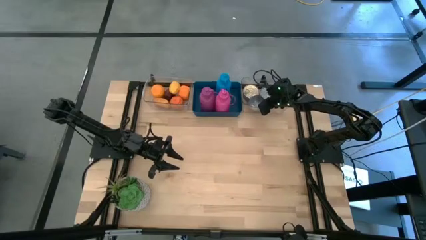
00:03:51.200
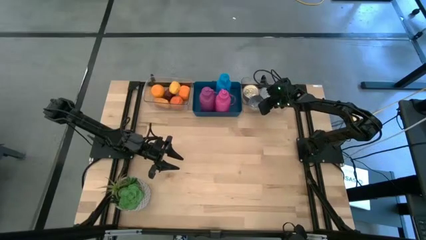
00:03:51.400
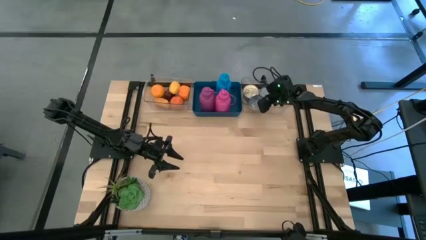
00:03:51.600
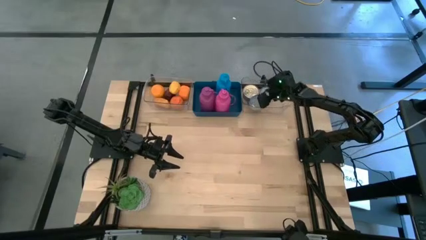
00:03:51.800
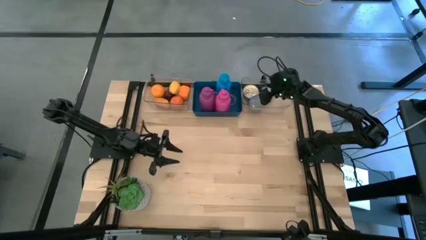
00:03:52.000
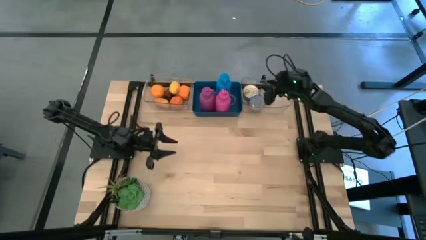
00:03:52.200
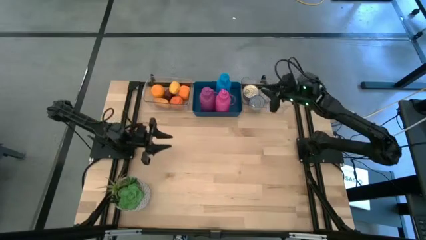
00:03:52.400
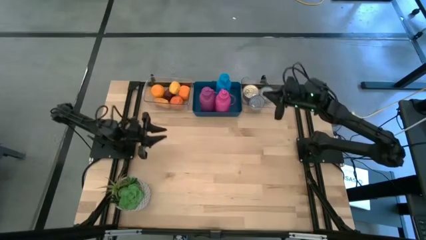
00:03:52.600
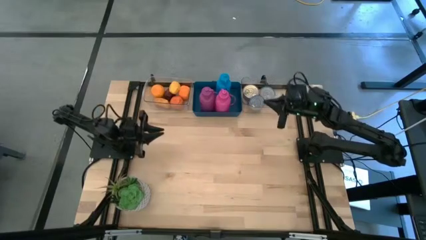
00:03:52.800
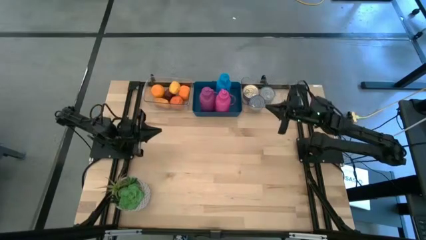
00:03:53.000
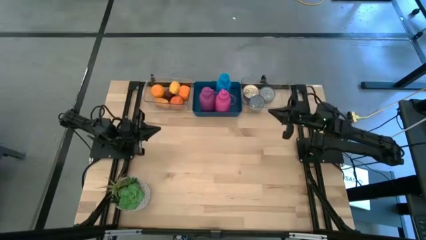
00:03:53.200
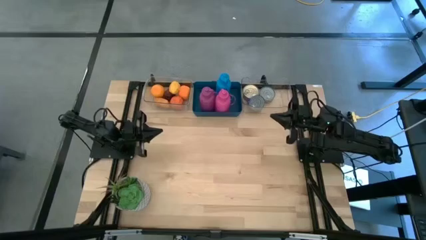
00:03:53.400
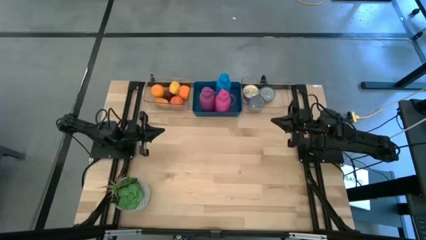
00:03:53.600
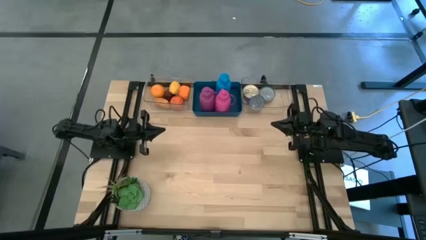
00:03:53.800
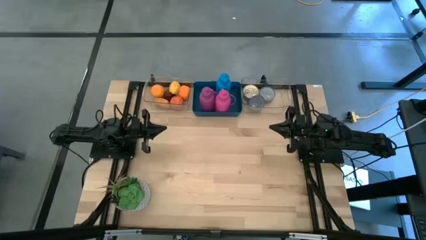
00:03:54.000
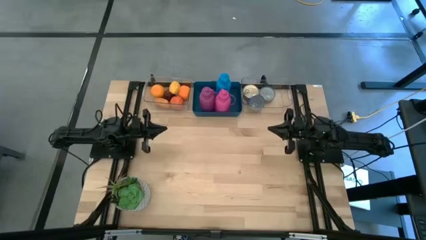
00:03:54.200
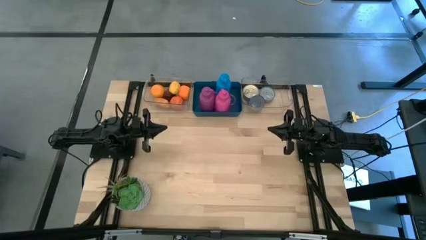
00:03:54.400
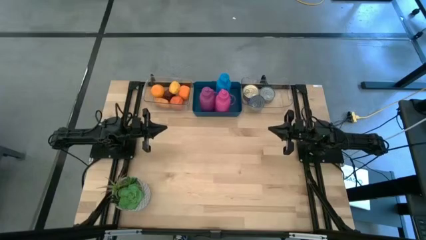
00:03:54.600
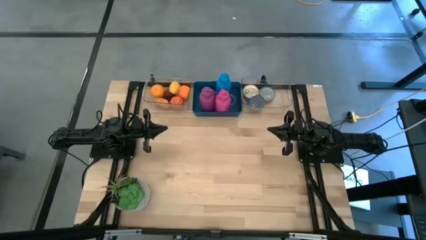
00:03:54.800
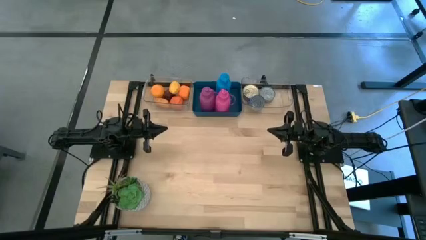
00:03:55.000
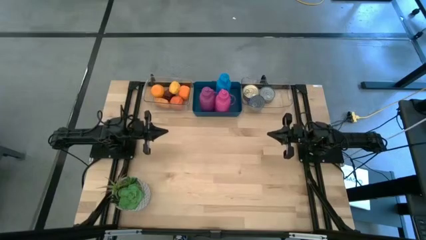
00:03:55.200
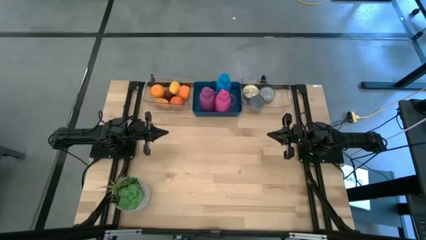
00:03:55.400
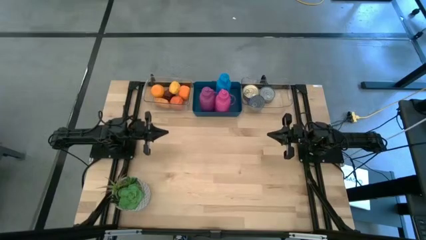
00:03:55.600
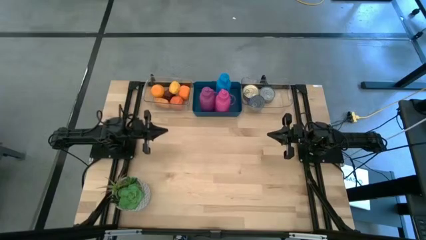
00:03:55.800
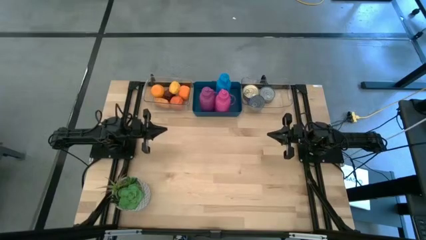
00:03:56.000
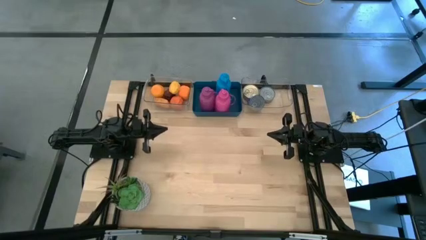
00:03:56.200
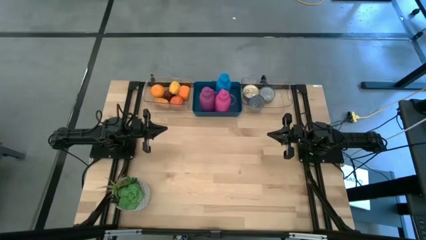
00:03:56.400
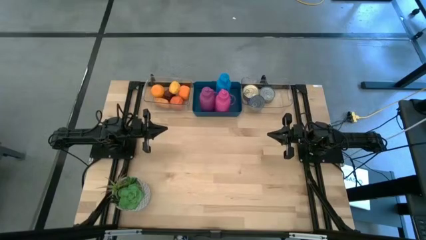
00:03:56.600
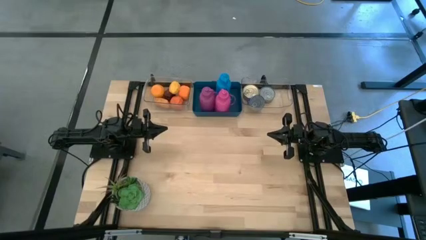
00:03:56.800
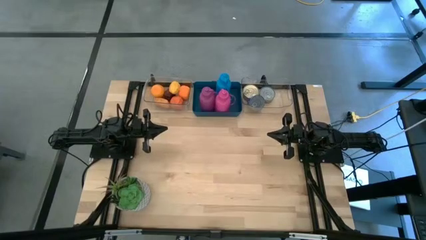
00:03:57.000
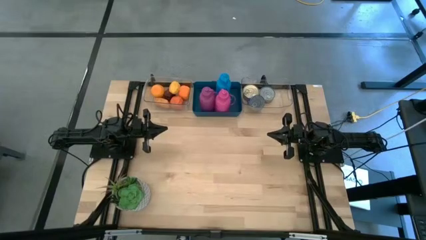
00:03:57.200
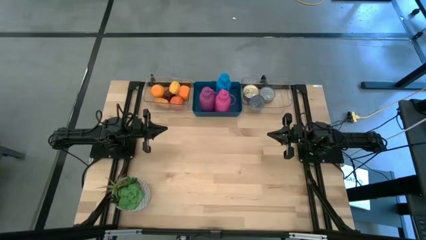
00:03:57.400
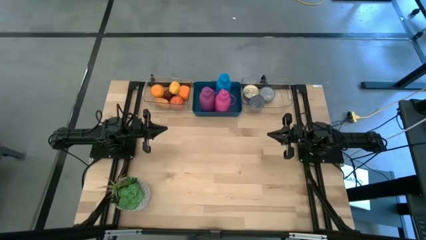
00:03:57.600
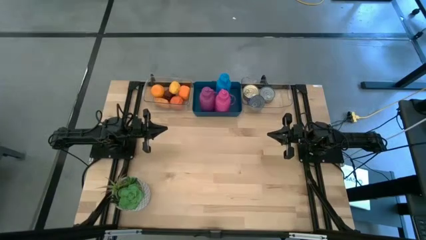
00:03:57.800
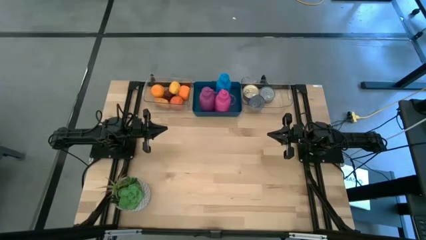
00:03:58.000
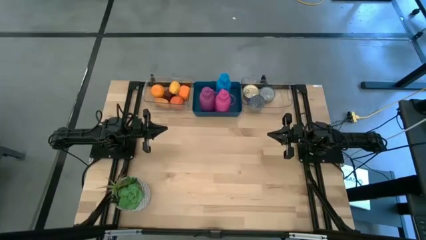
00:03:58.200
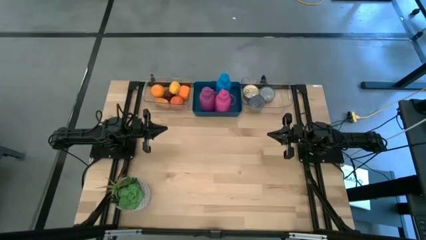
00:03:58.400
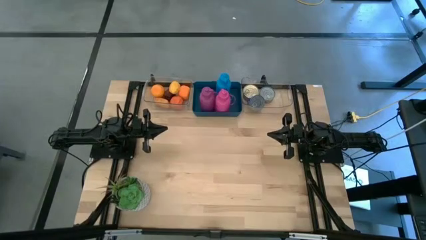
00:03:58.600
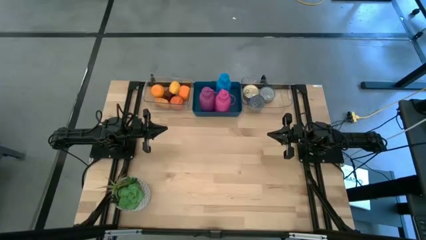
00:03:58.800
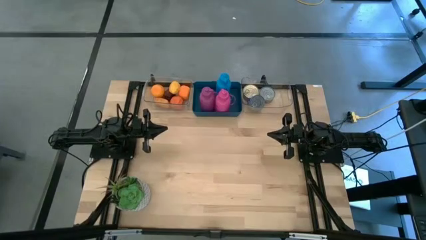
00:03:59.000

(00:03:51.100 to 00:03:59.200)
Task: Pick & Place Food Item
Return to Home Position

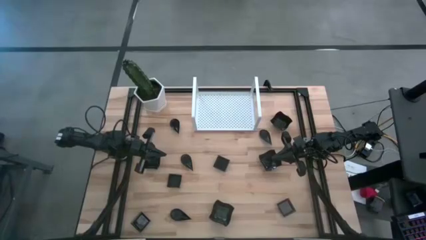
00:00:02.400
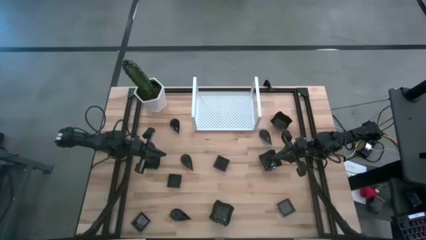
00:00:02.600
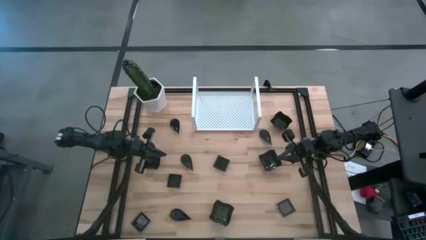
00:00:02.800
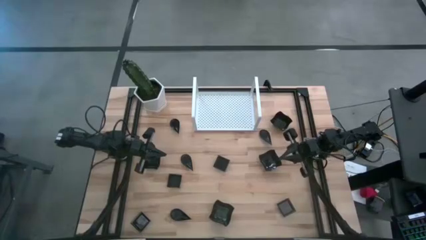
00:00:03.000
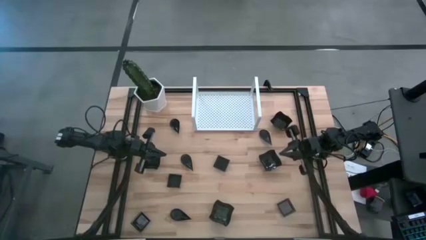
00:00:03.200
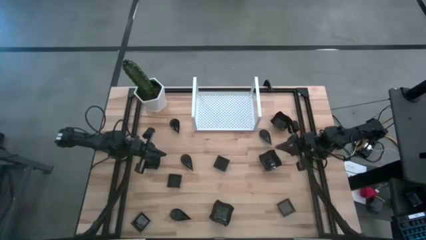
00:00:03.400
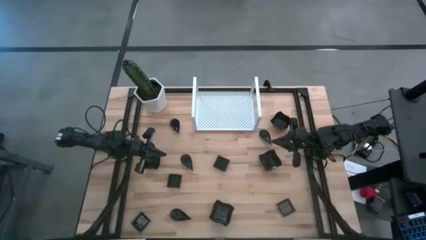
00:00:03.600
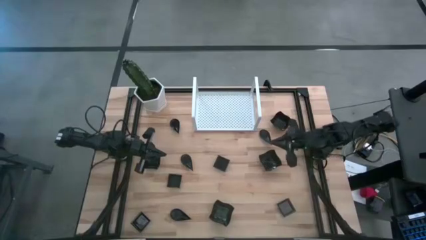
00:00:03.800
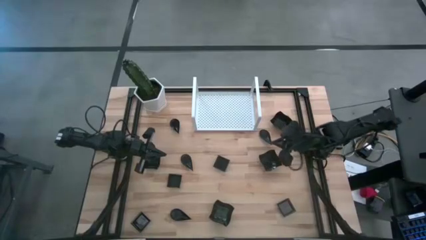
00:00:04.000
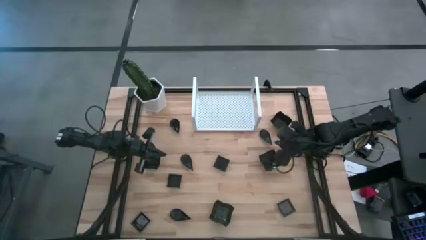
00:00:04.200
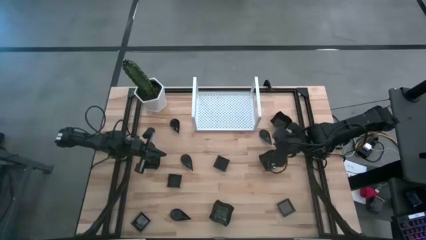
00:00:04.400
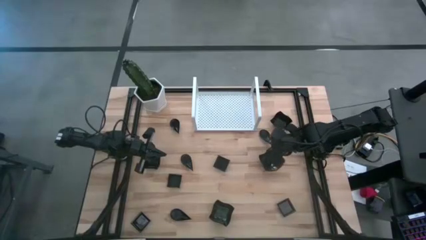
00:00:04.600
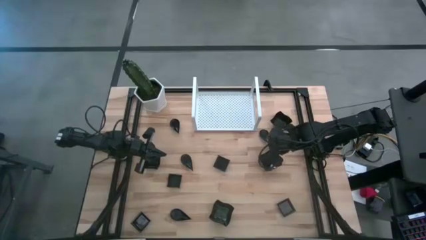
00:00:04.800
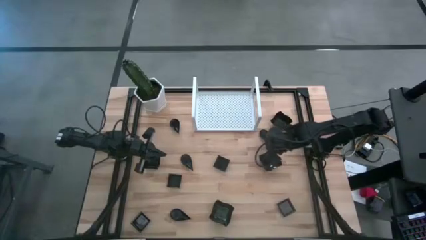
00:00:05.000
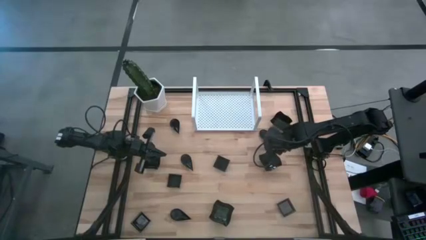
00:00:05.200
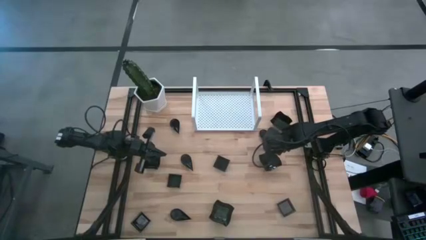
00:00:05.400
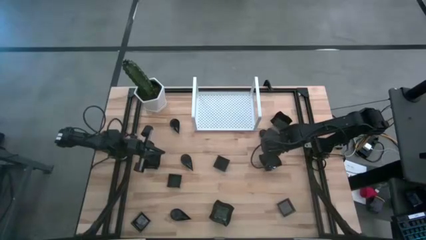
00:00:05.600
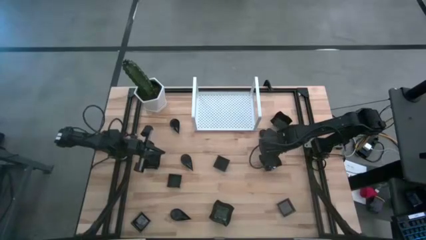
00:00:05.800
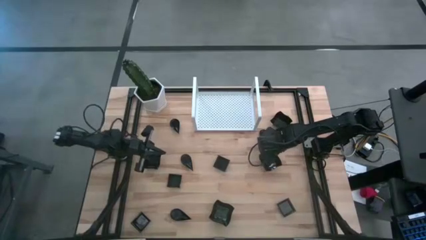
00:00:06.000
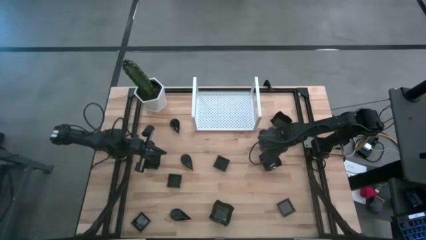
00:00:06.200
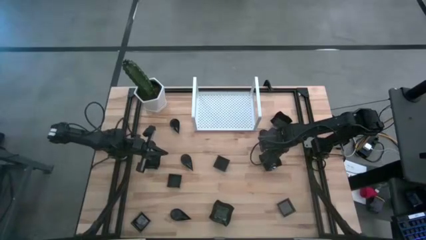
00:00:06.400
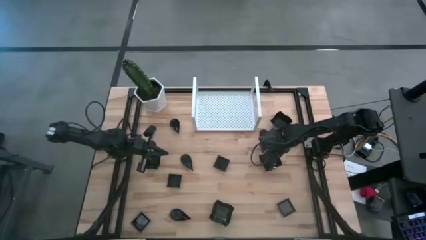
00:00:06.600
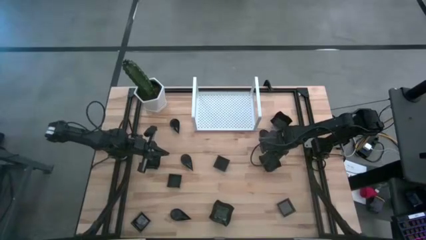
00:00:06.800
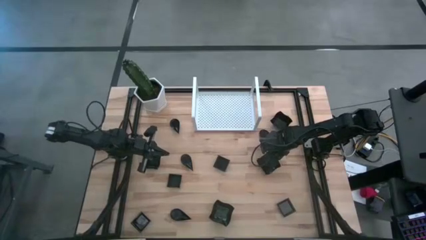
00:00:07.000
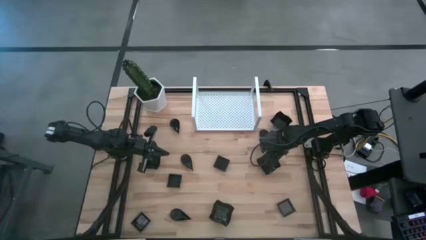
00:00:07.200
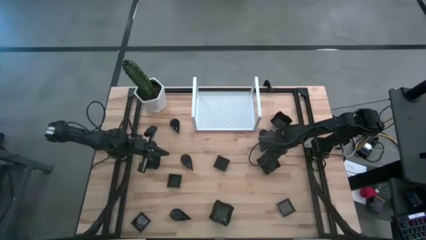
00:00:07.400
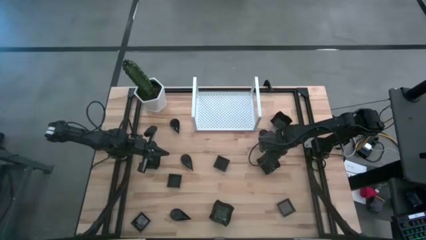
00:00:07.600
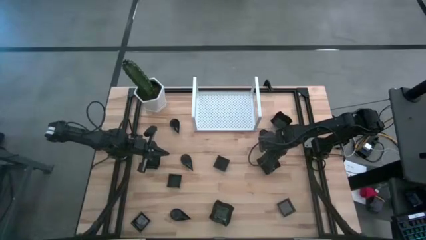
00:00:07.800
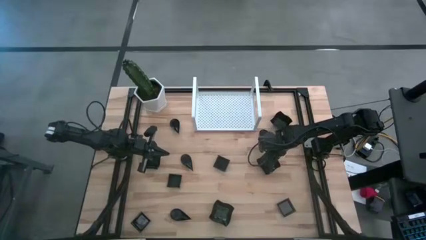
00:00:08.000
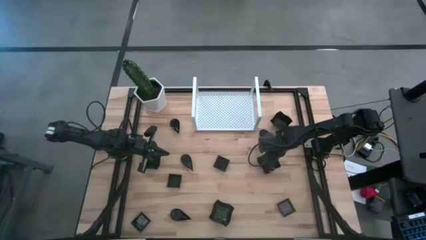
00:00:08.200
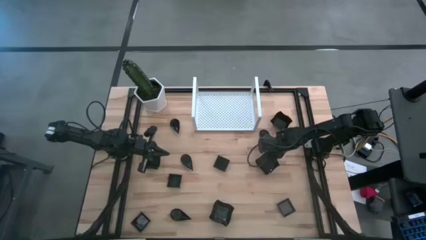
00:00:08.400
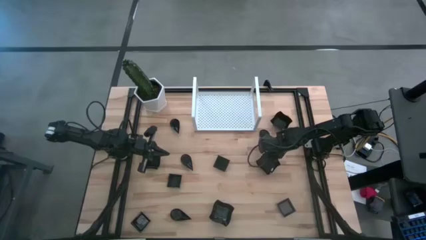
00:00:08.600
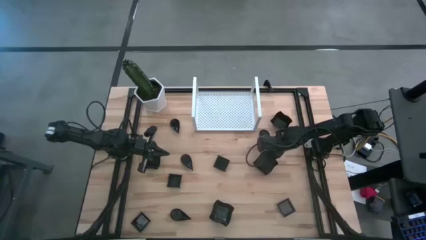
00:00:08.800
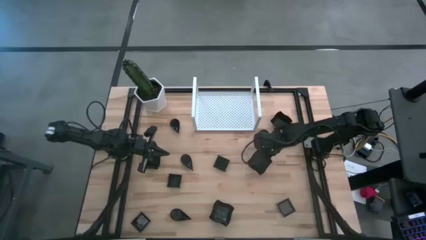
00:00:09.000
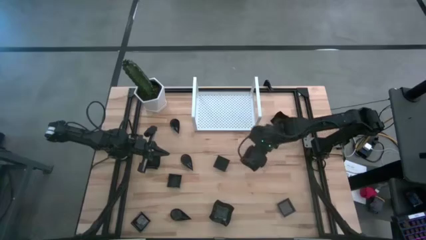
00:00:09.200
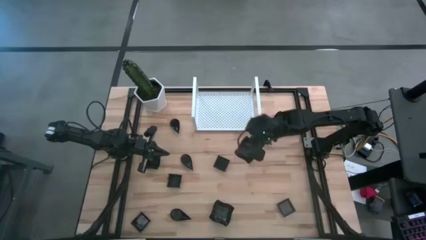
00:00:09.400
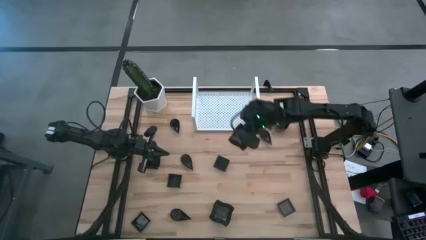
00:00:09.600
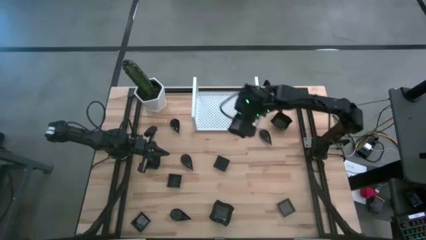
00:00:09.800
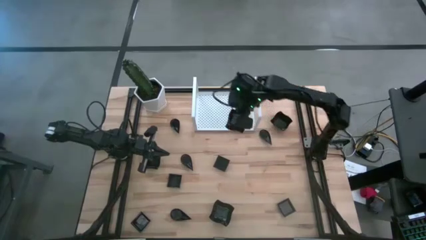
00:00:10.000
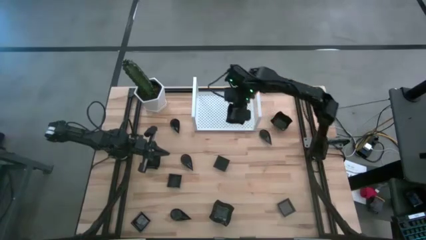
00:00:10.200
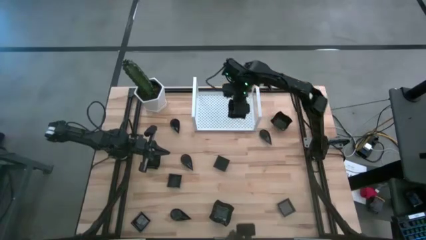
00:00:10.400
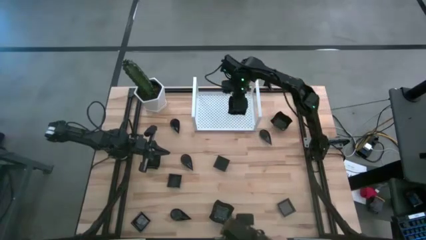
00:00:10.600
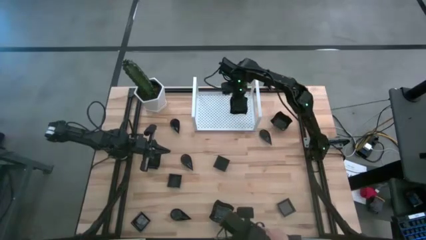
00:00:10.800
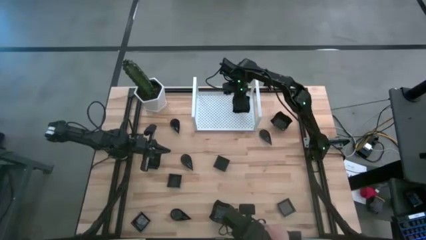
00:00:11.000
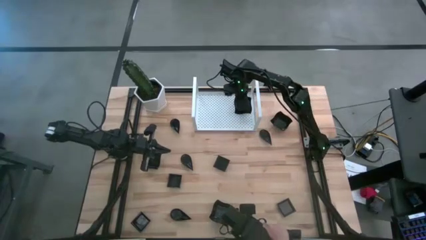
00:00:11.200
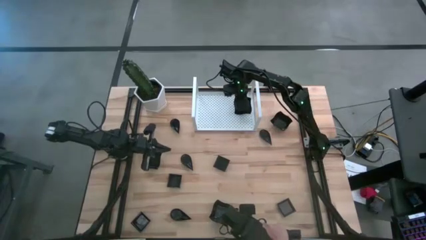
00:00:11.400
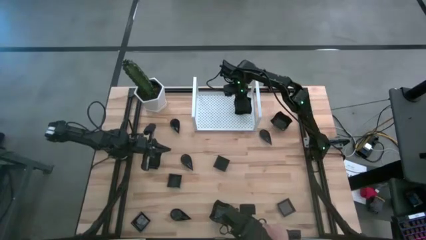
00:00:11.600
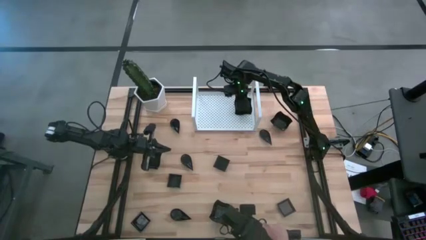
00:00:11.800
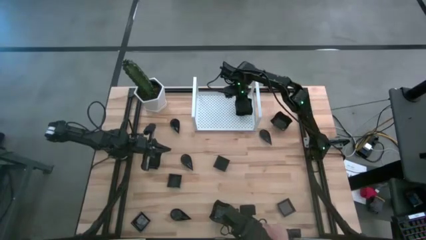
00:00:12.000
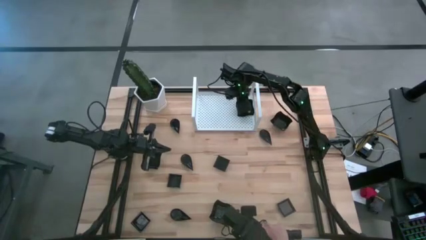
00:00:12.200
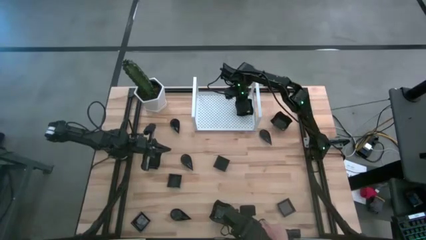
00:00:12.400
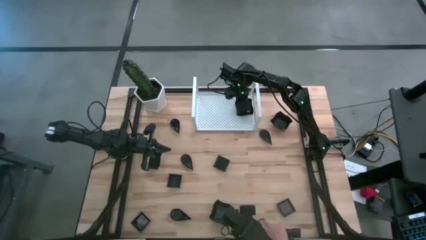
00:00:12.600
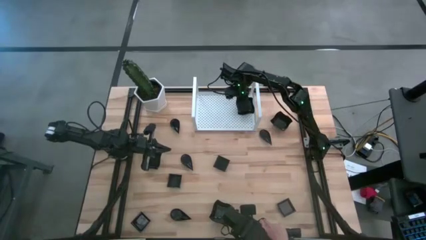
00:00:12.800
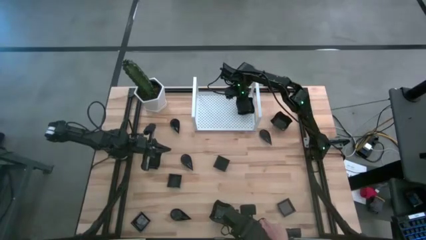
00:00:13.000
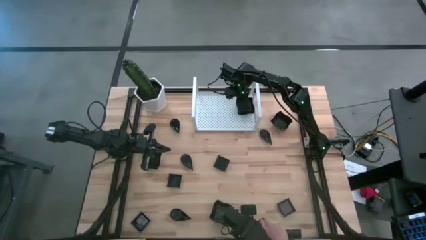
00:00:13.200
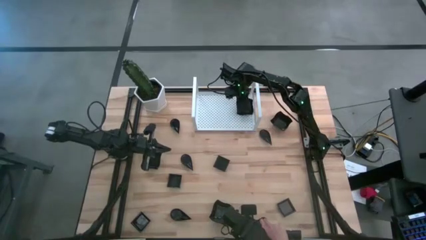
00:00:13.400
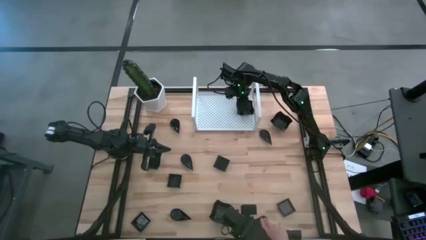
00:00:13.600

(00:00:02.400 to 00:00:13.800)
Task: Pick & Place Mini shaped plates
Put the black distorted square plate on the shelf
